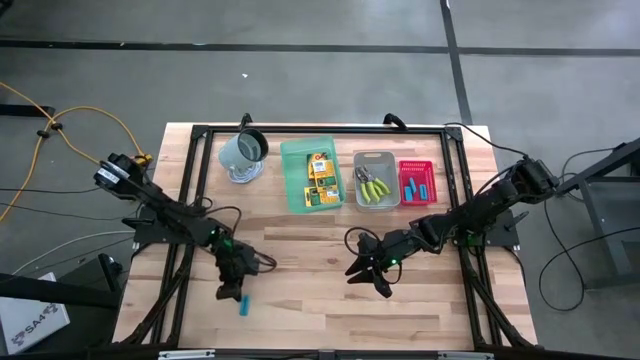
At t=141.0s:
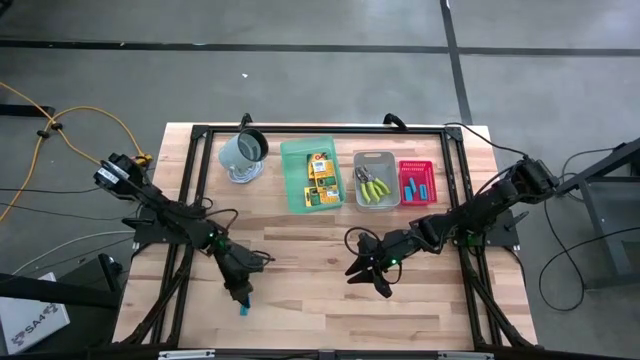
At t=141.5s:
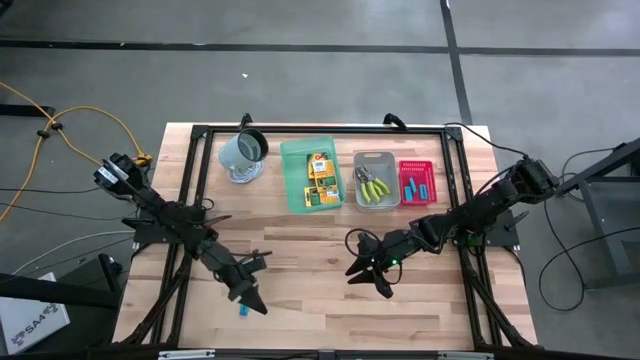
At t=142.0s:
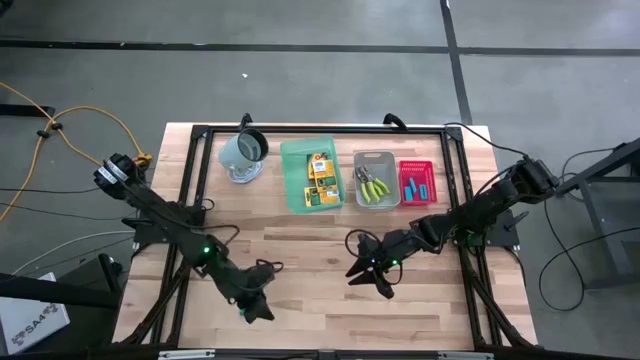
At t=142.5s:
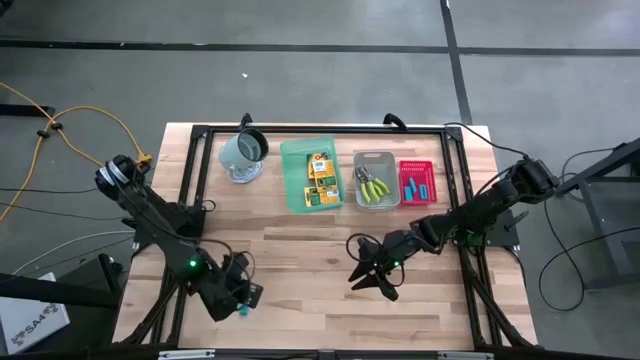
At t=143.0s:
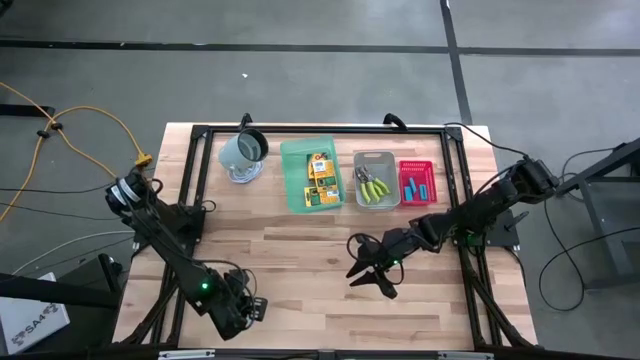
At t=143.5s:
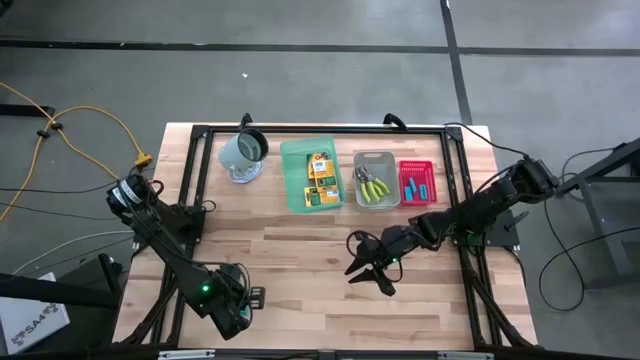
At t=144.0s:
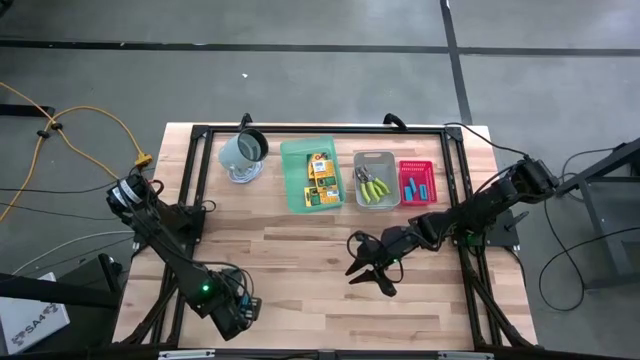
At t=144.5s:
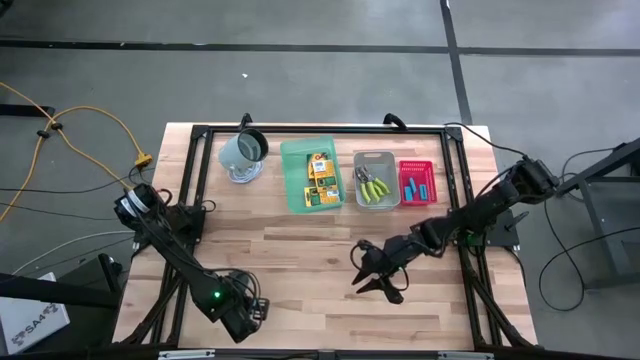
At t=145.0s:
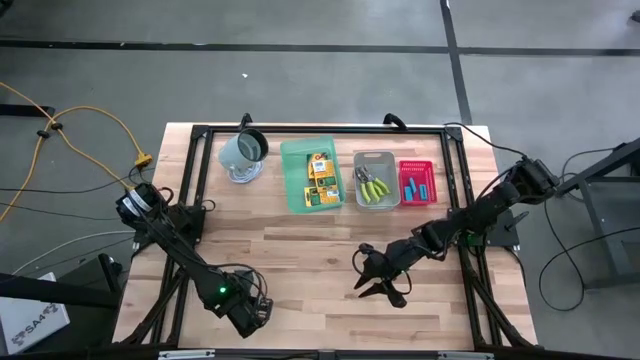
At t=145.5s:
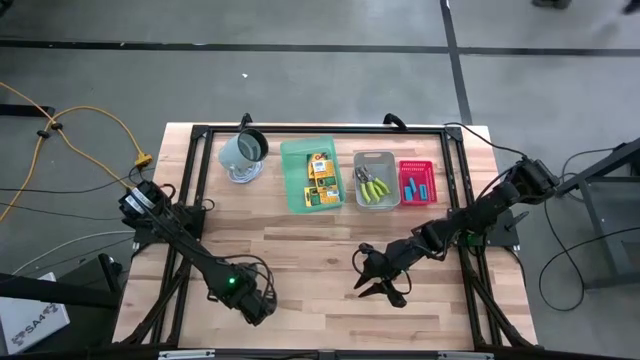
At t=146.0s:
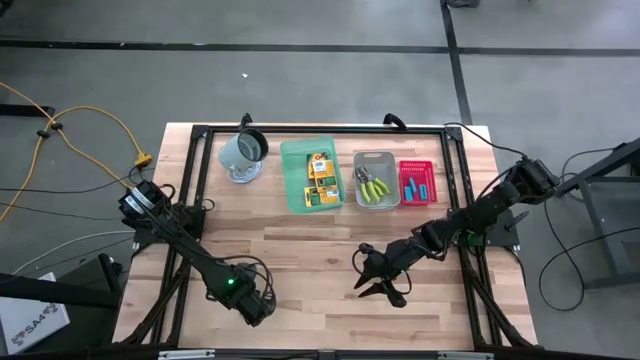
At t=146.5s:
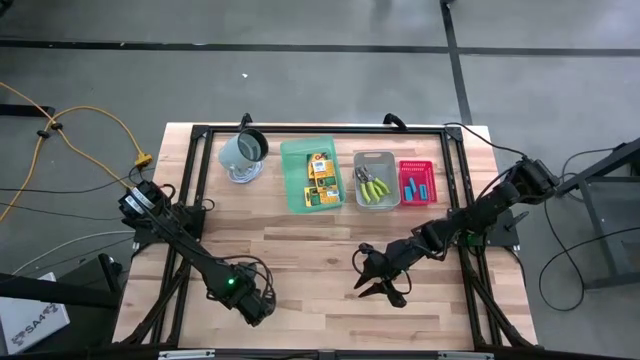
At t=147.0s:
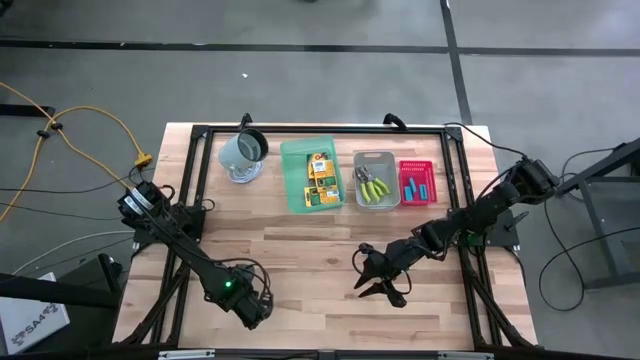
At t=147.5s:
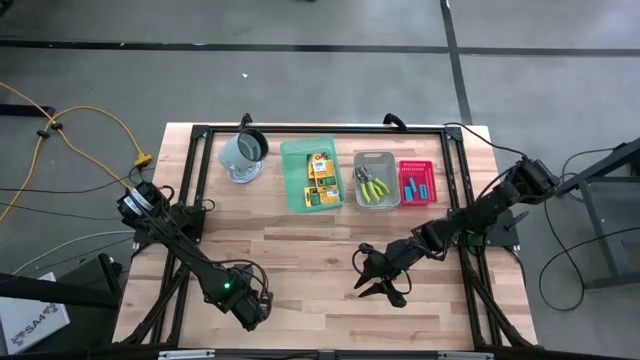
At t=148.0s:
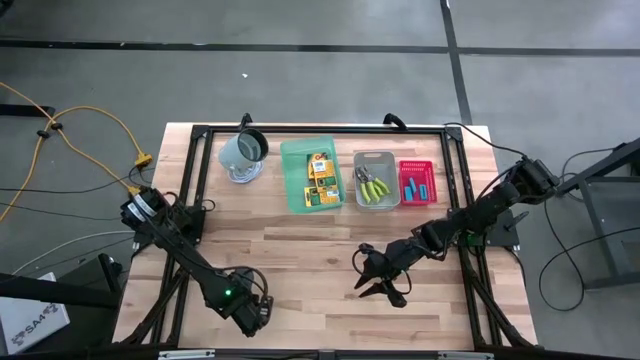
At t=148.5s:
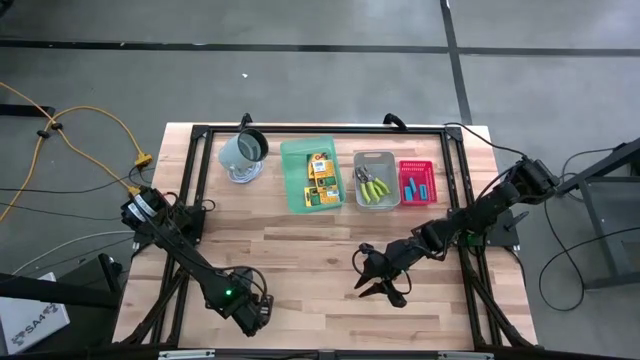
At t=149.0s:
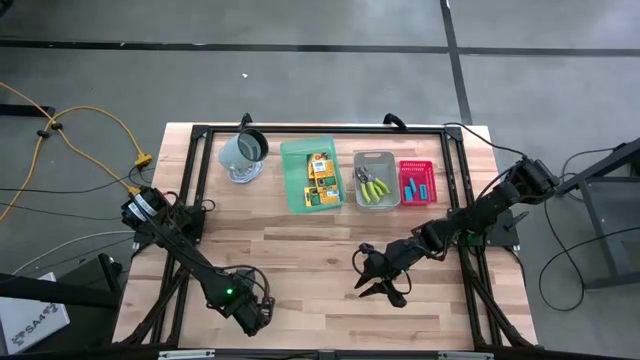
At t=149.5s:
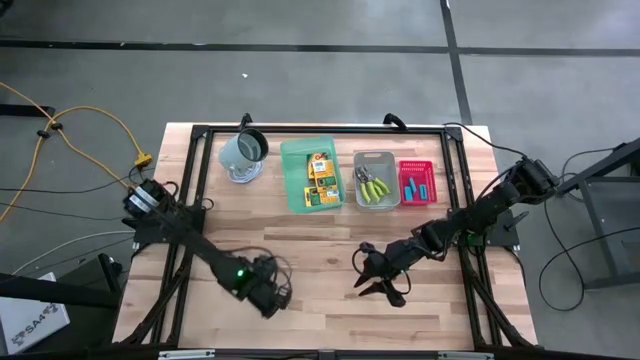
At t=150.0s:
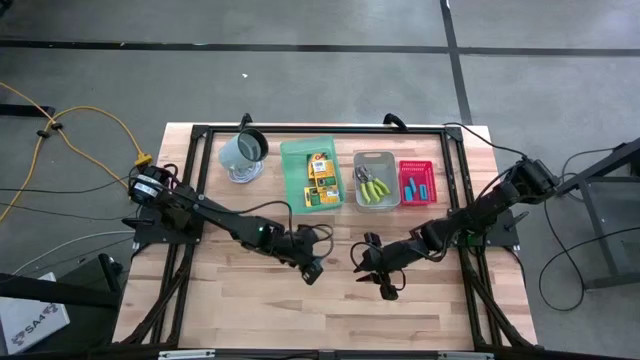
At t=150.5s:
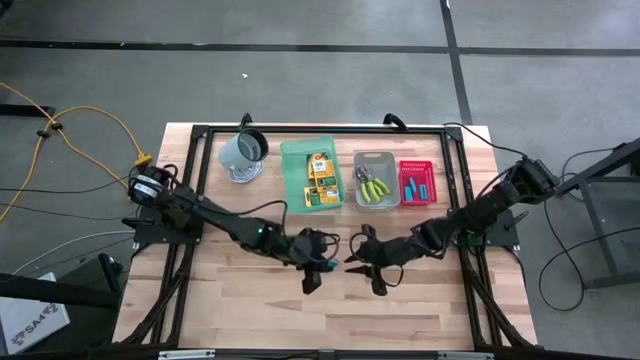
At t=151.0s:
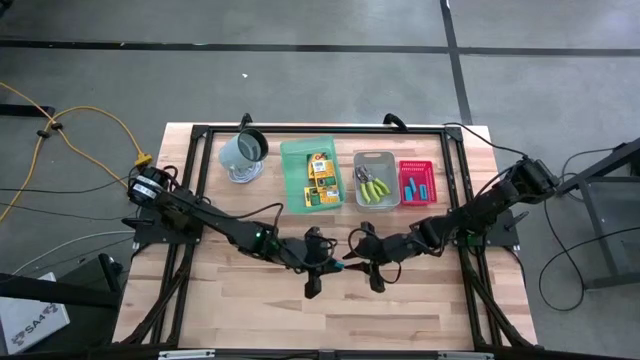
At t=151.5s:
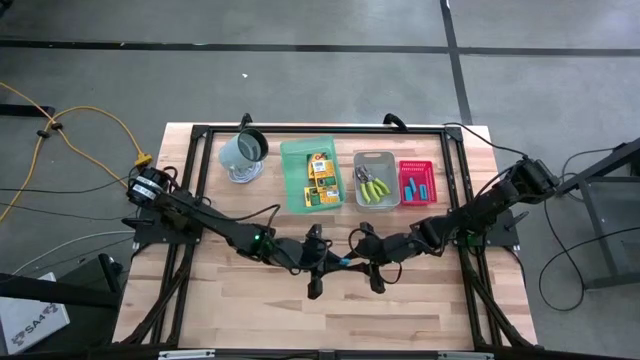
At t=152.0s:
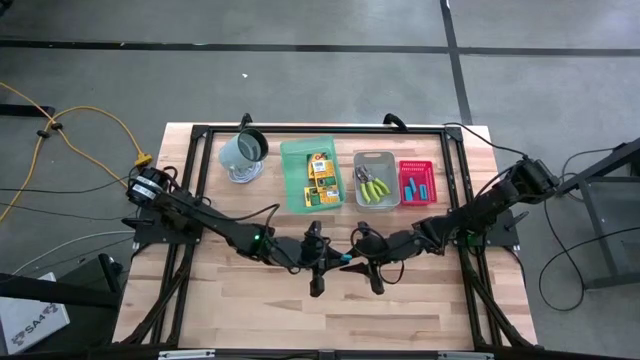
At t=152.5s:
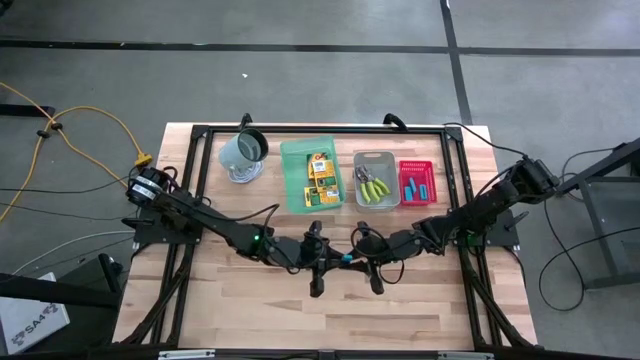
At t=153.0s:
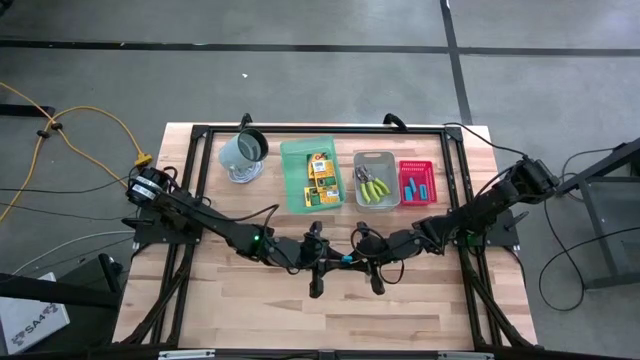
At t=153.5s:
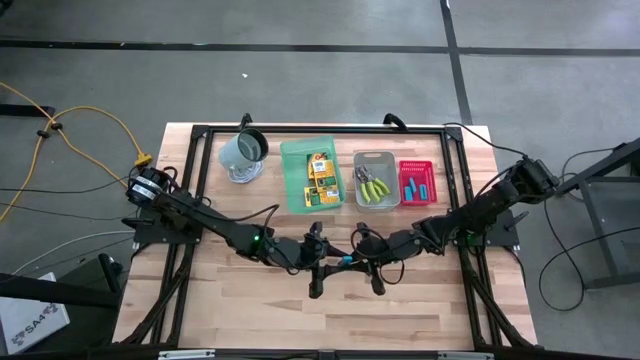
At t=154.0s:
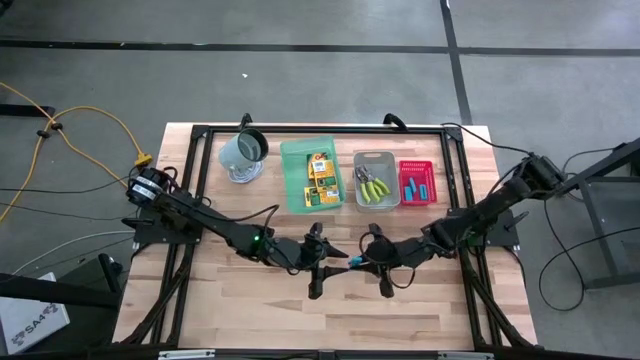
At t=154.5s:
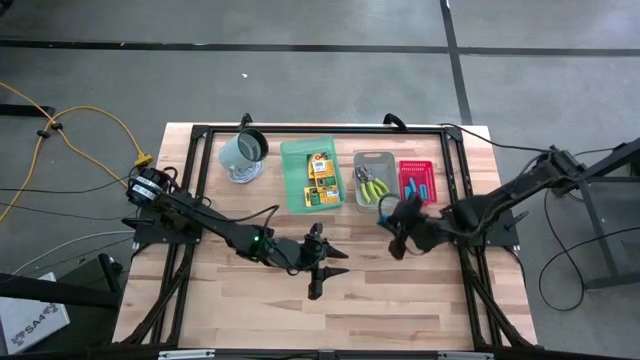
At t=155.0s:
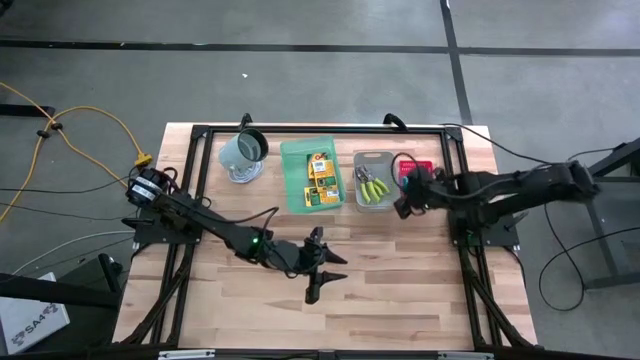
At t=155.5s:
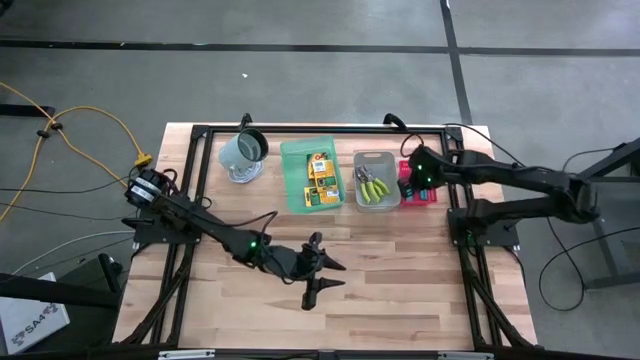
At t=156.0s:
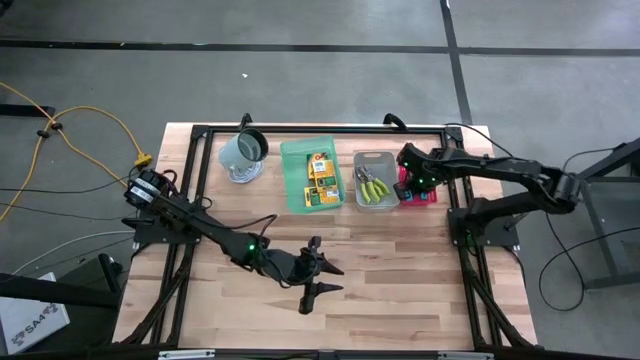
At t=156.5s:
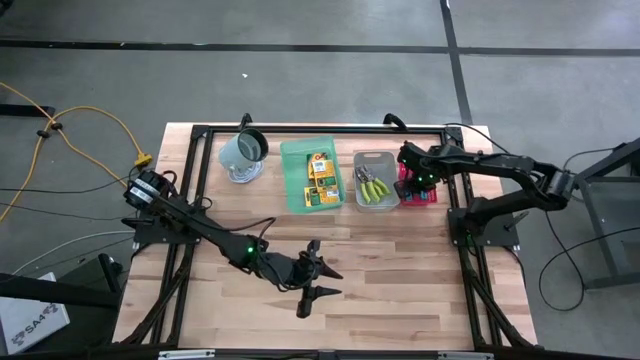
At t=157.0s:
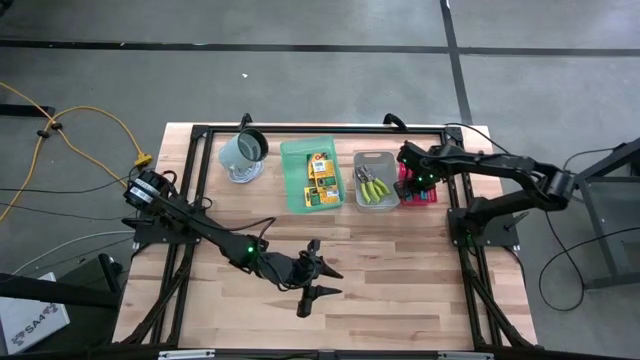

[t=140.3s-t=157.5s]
Task: Pick & Place School Supplies
Put the blue eraser into the red bin

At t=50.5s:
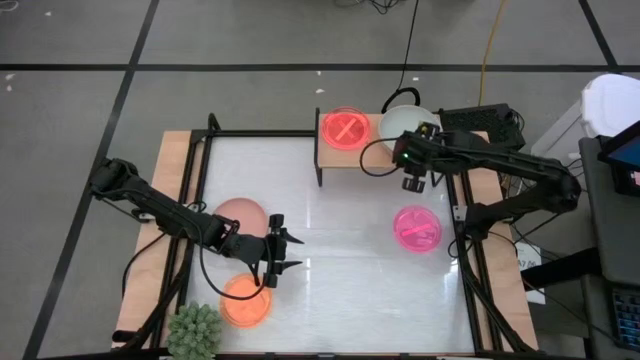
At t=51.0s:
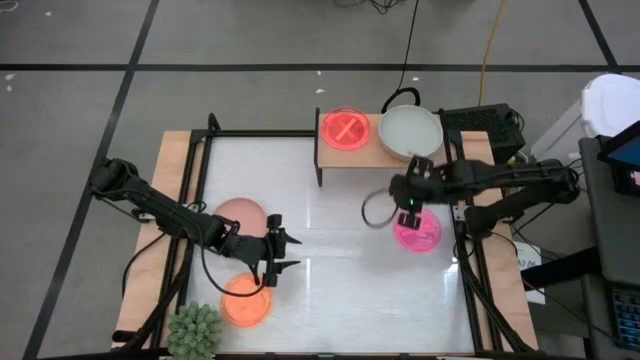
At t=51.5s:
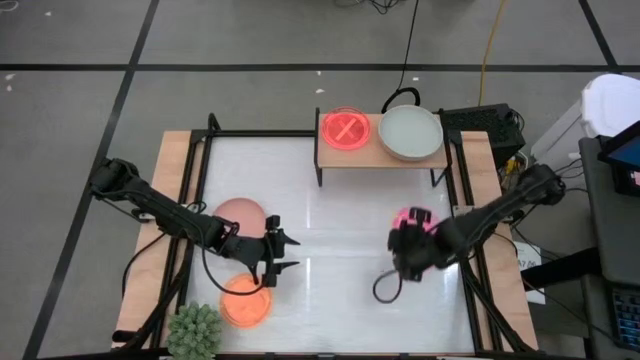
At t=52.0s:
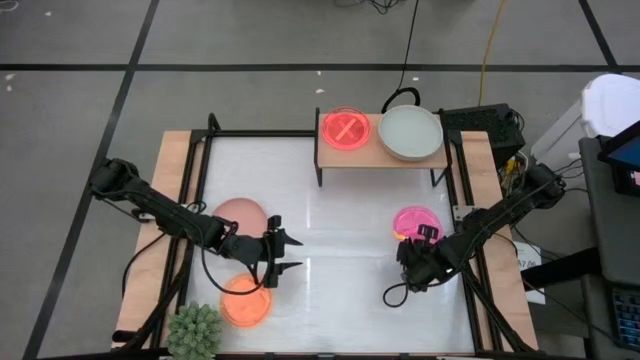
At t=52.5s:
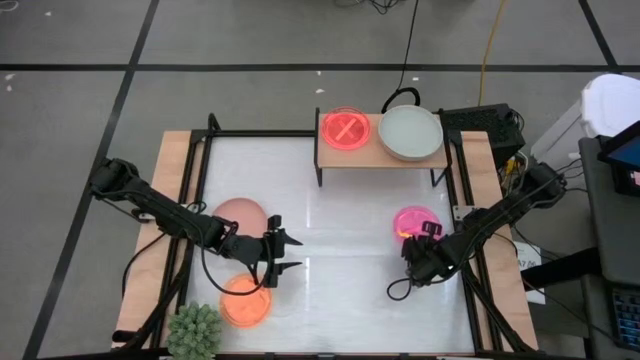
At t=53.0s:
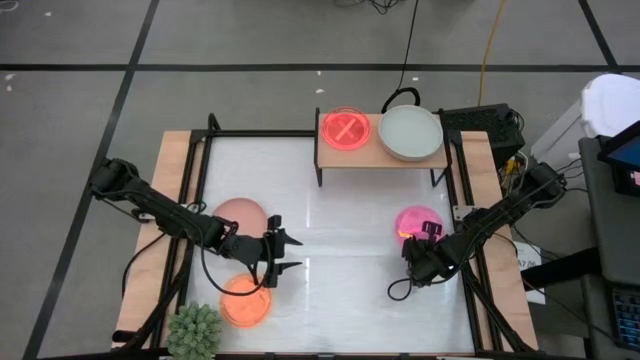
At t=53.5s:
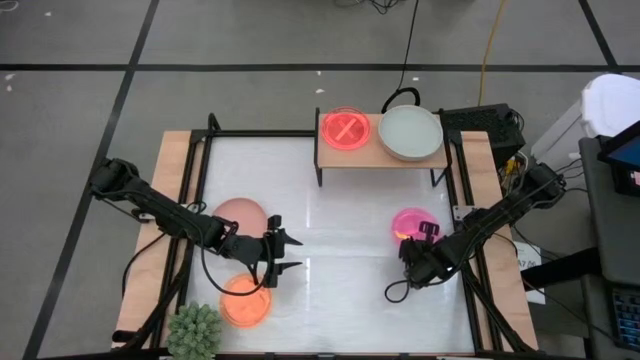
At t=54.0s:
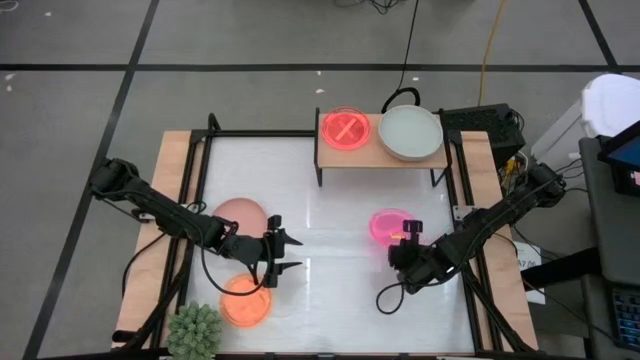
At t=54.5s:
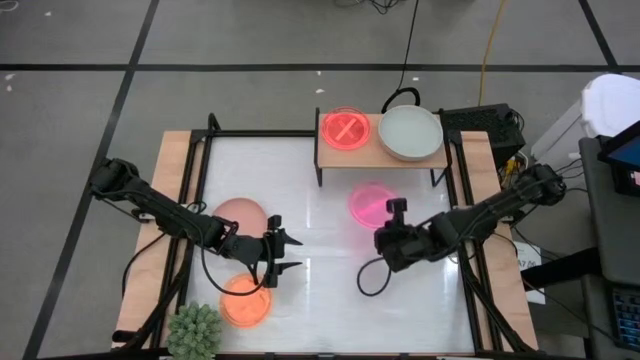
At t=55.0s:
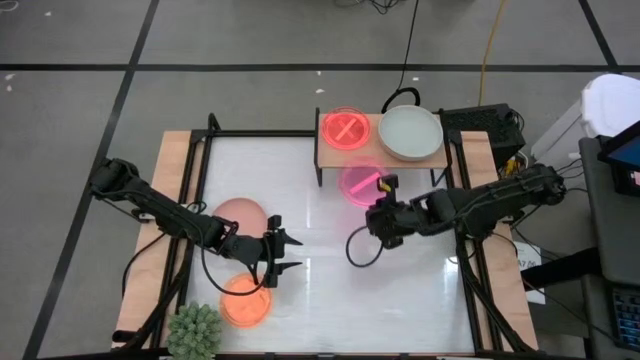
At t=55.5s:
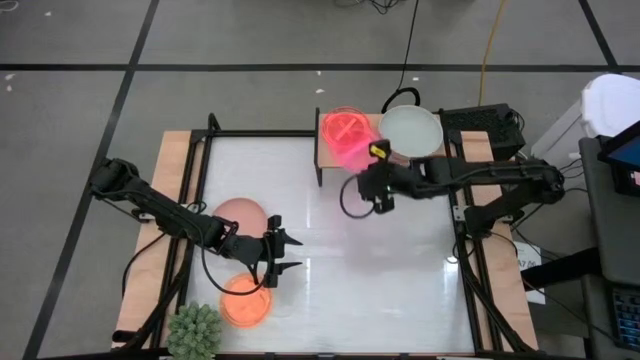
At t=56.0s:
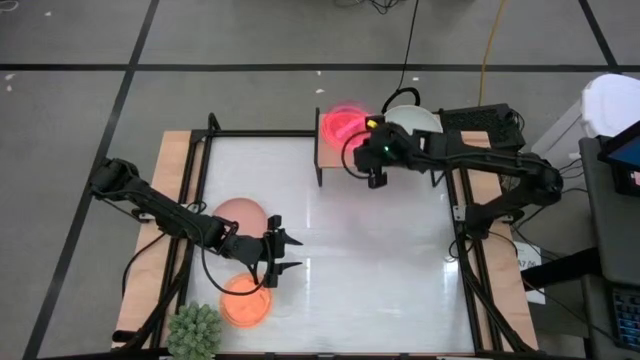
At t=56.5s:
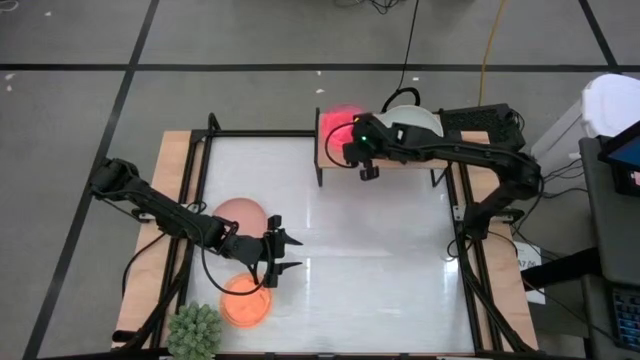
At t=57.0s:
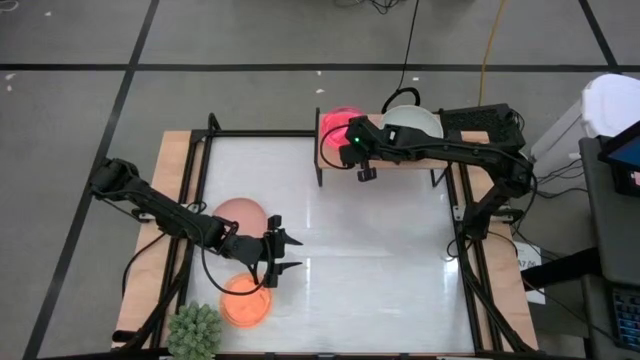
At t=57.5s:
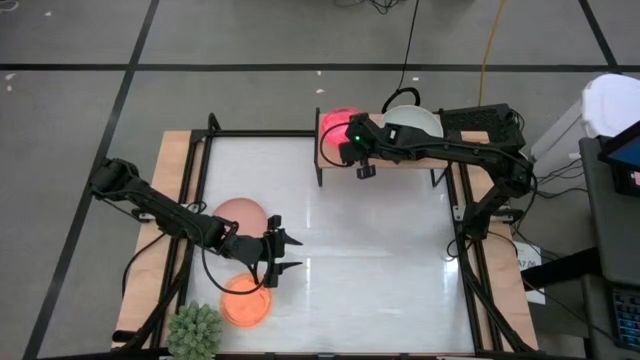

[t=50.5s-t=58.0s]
Task: Place and stack plates onto a shelf
Stack the pink plate on top of the orange plate on the shelf
